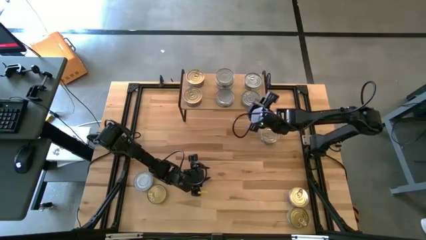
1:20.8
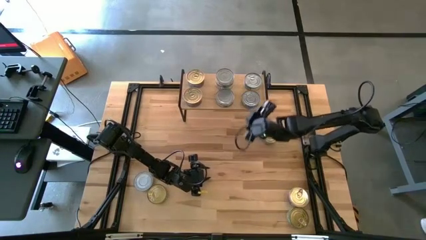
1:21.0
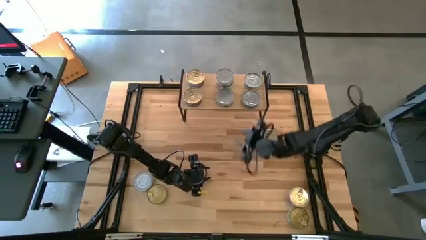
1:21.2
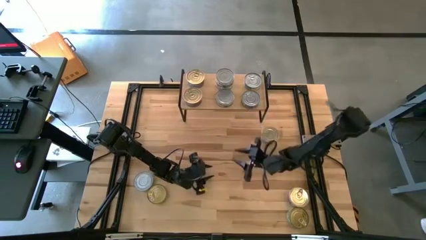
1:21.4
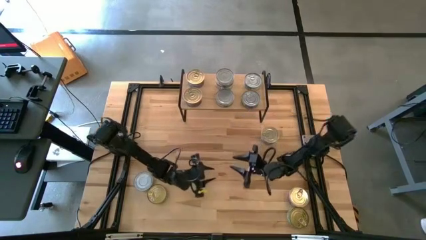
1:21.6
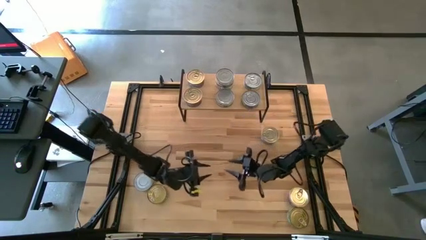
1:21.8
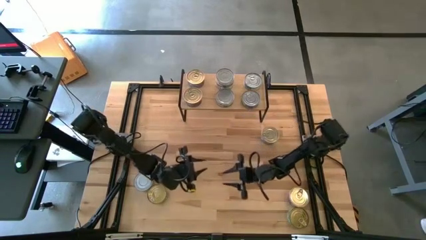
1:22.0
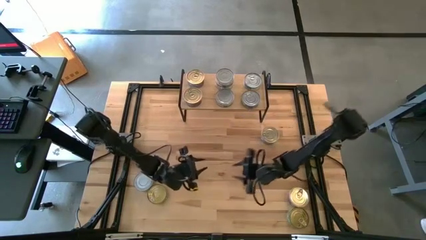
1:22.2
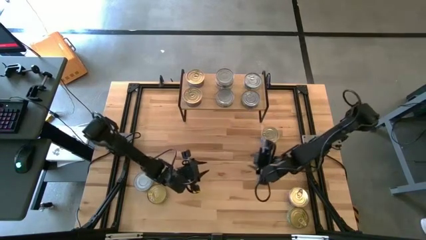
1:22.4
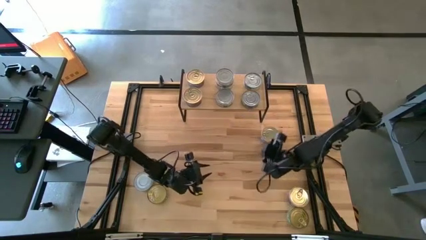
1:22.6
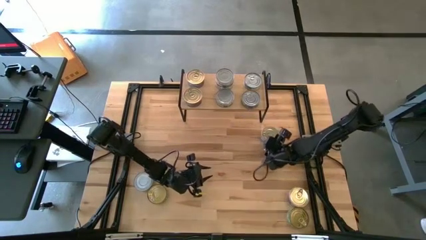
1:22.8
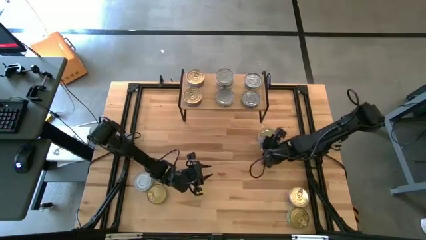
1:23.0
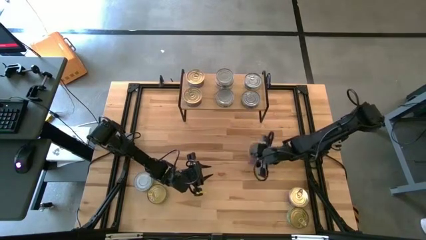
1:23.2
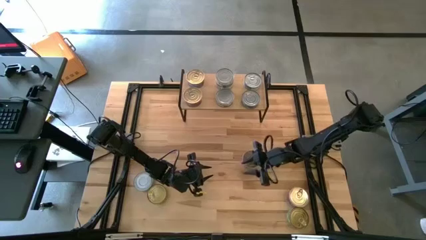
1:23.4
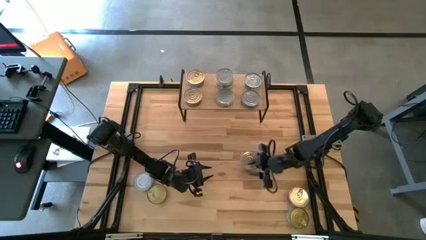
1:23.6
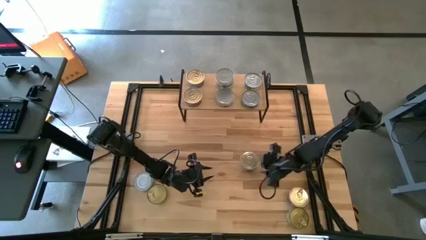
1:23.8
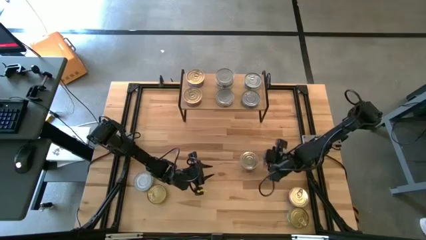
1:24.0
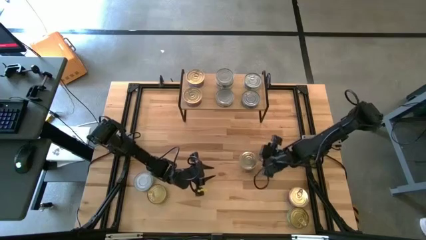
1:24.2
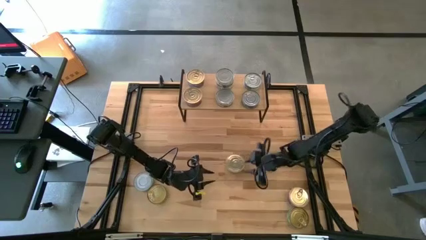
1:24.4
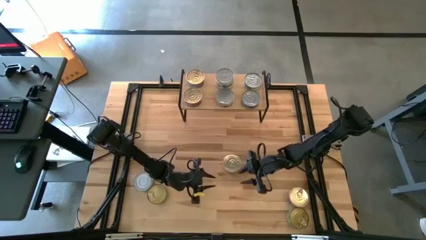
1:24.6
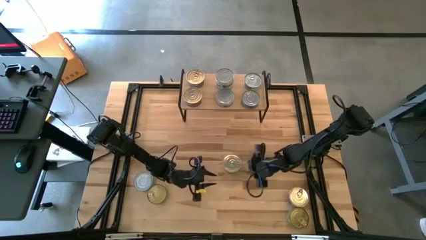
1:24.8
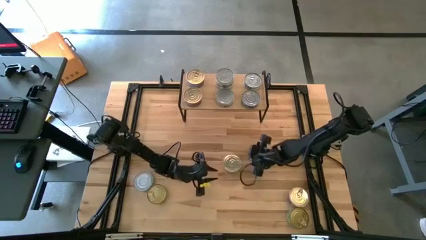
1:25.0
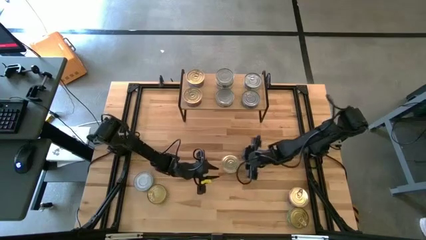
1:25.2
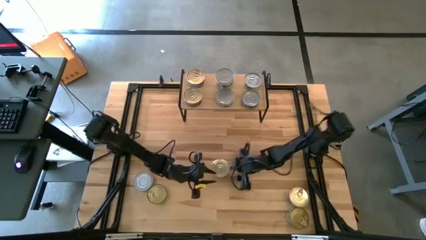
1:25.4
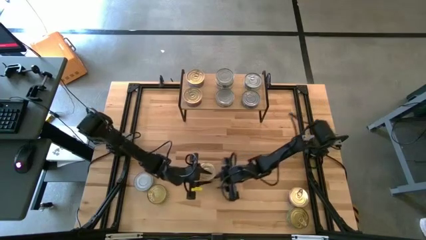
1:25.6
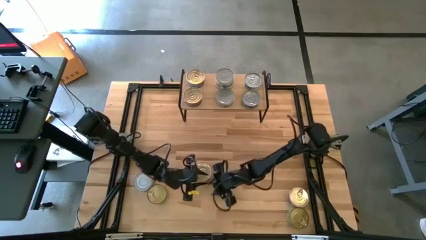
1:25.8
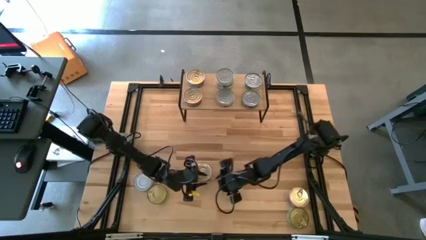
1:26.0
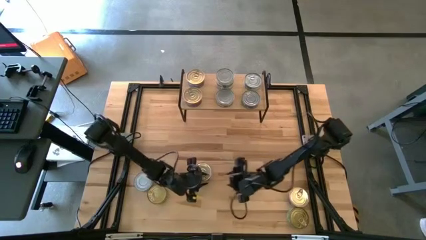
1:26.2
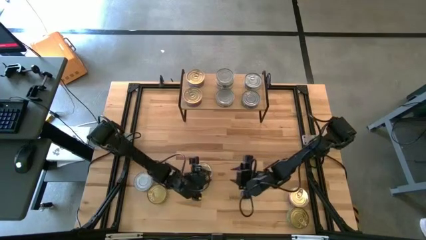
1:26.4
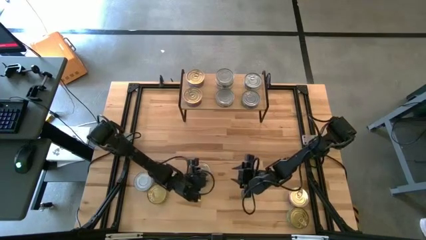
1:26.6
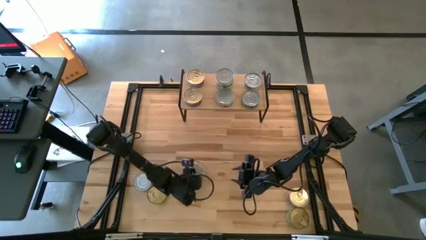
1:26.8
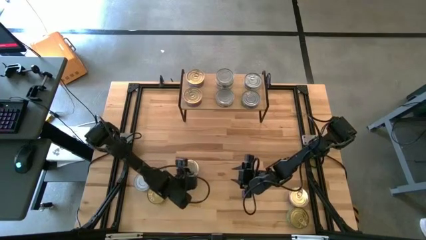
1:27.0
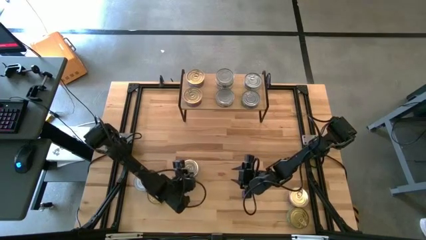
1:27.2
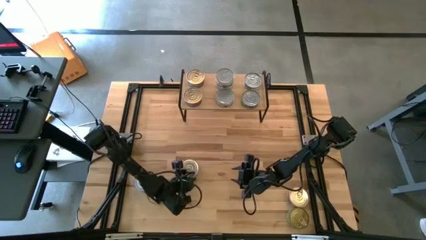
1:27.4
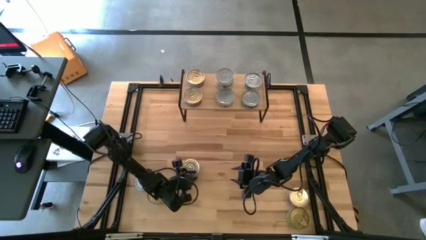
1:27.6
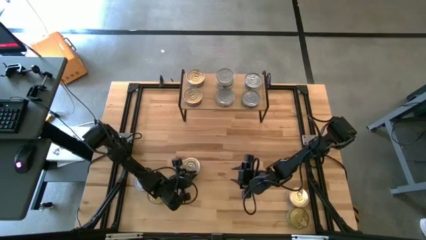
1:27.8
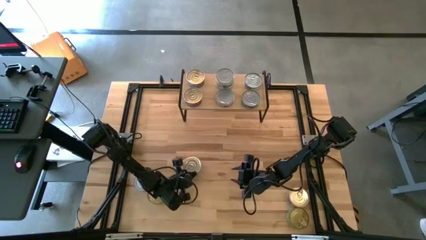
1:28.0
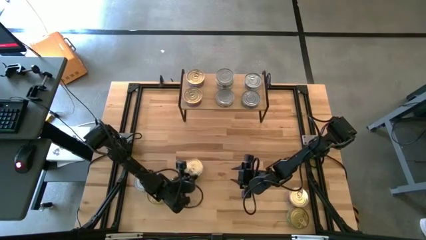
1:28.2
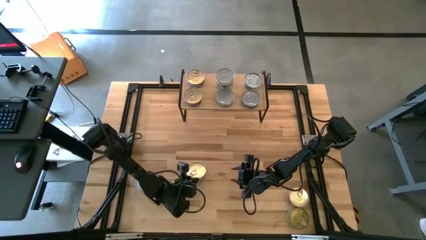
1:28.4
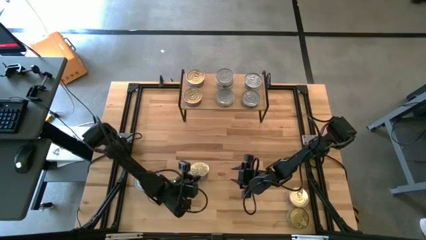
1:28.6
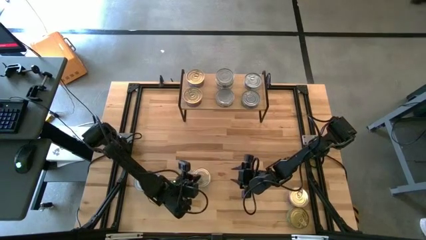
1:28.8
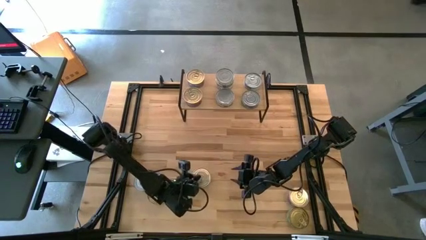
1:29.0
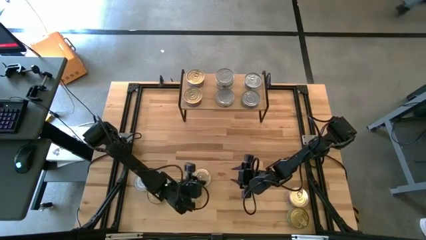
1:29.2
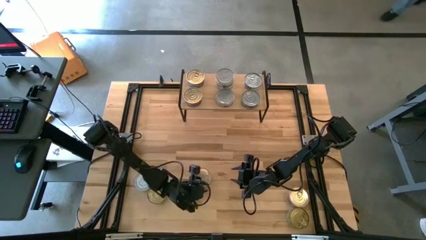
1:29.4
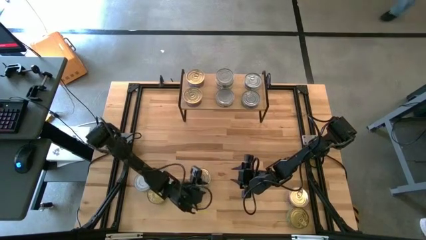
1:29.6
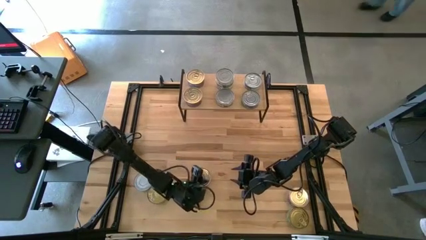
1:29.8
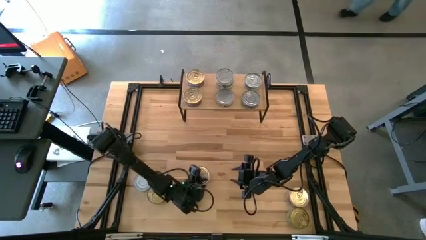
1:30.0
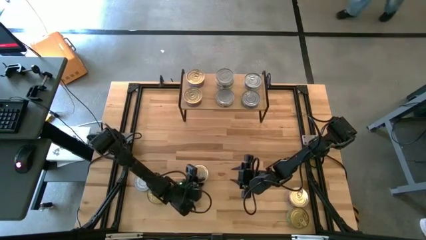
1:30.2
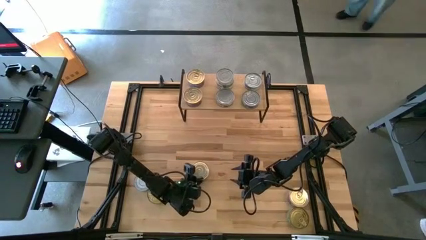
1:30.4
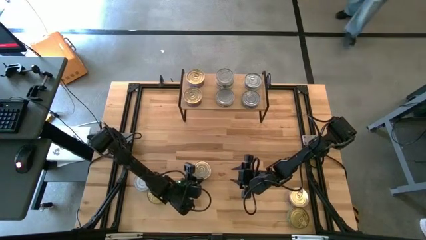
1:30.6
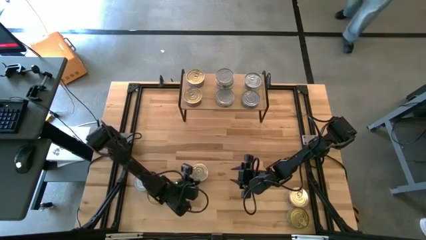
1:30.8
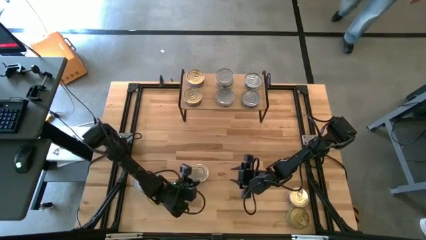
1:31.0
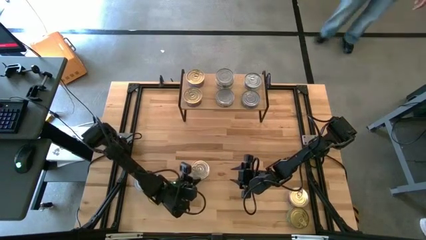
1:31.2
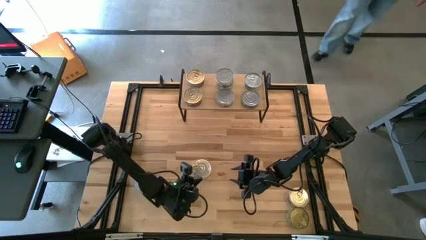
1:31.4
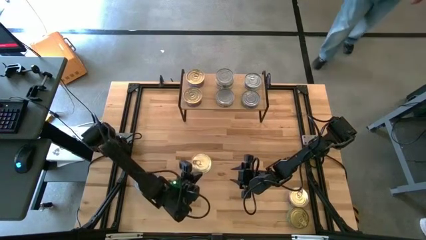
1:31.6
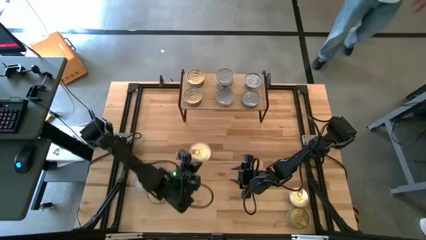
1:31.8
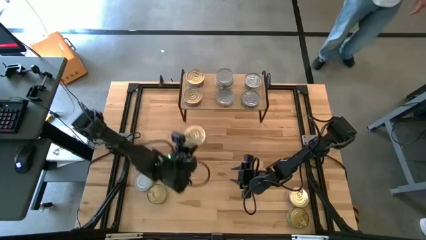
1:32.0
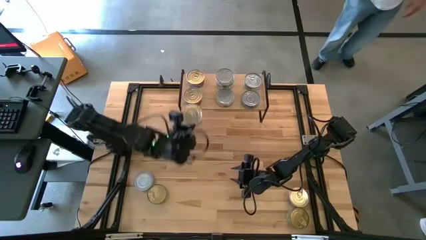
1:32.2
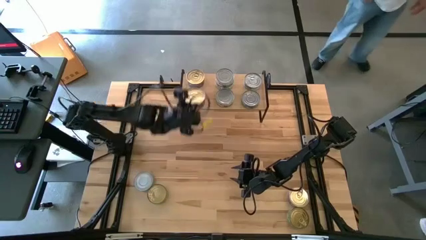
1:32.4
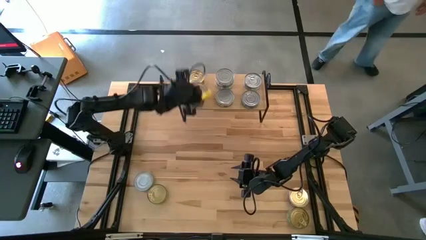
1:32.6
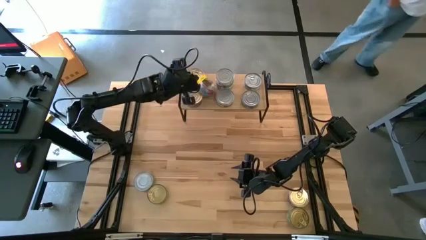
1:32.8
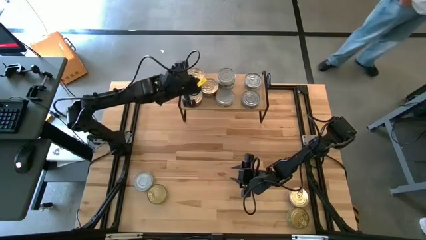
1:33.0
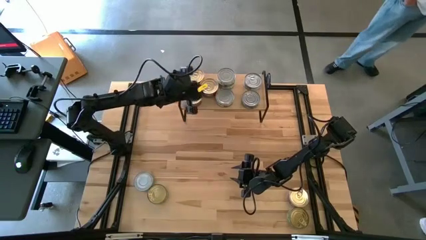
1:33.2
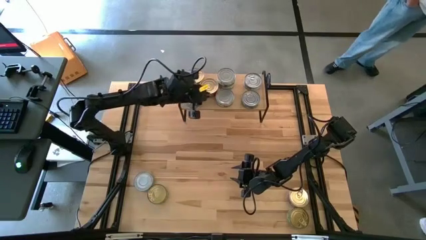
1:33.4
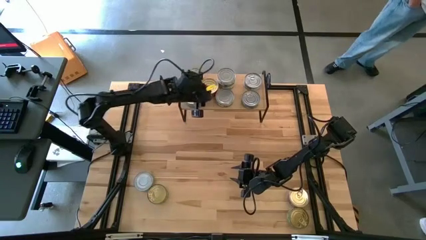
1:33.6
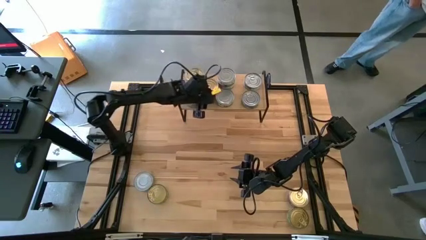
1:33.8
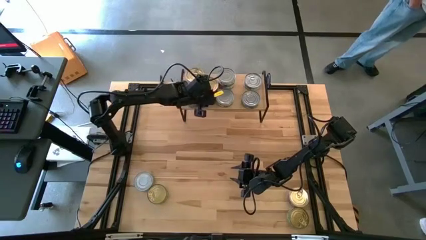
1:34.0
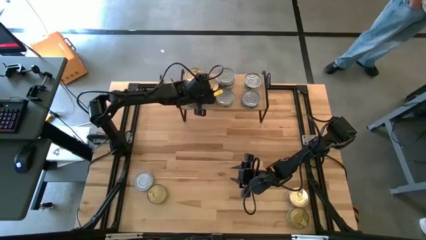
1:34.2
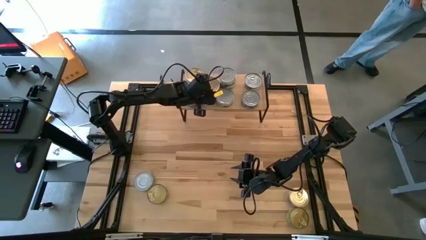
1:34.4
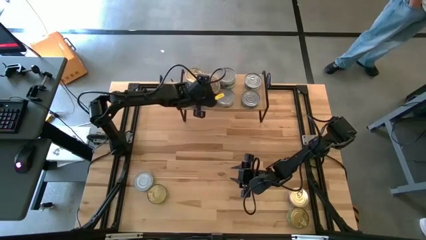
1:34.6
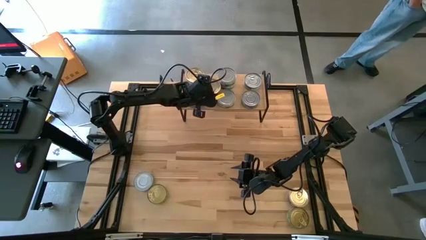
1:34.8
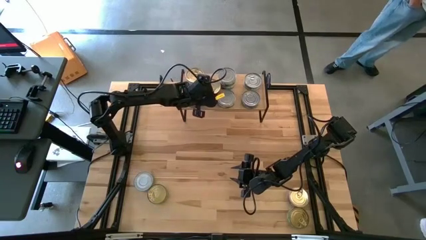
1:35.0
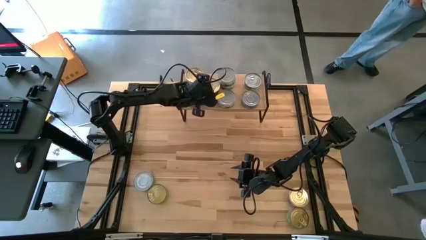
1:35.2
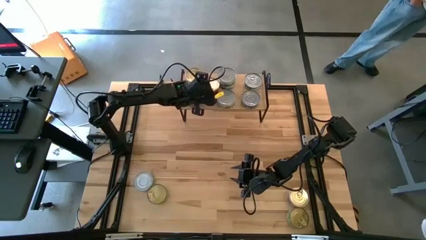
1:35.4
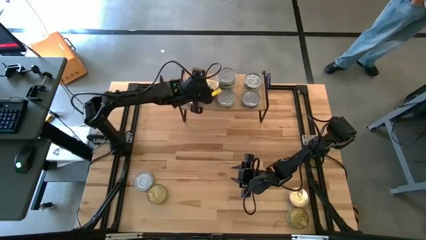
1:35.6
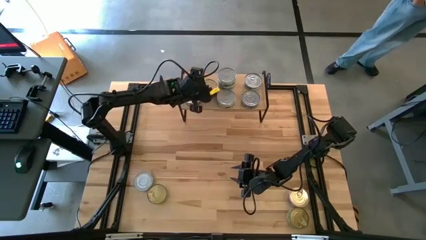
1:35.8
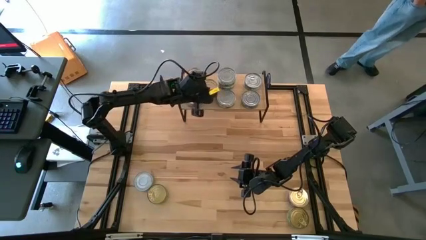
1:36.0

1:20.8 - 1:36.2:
Task: Stack canned seafood by type on shelf
Stack the blue pink tuna can on top of the other blue pink tuna can on the shelf

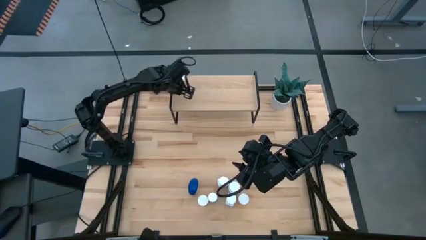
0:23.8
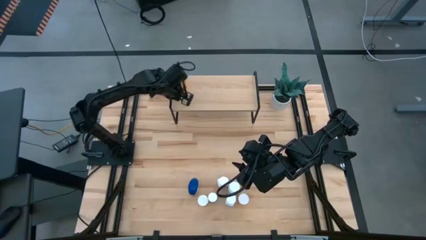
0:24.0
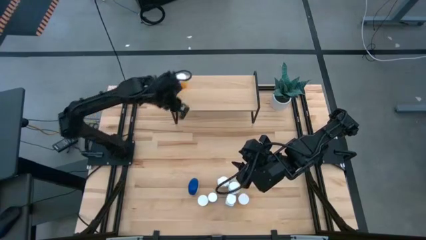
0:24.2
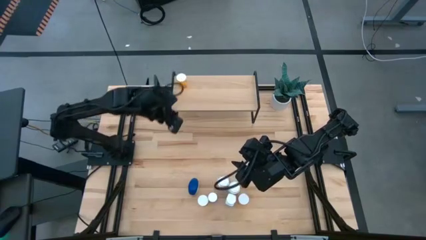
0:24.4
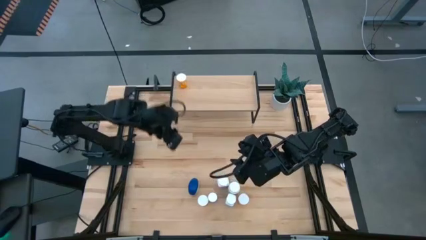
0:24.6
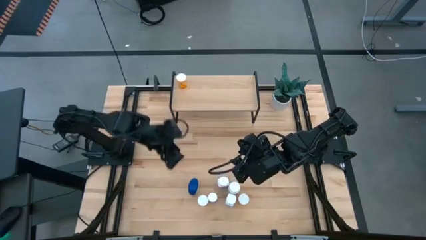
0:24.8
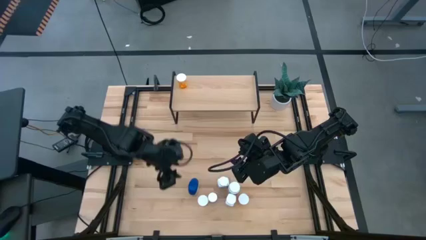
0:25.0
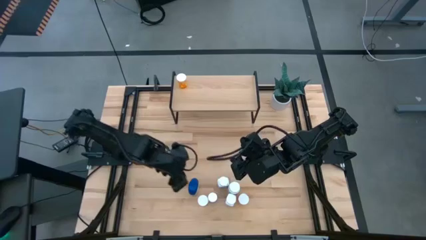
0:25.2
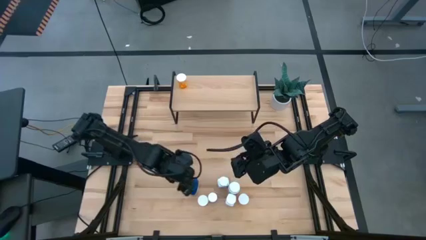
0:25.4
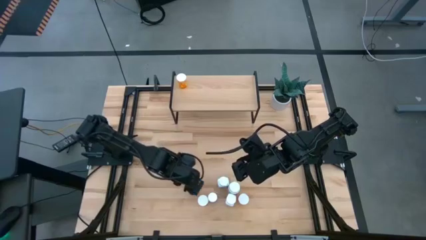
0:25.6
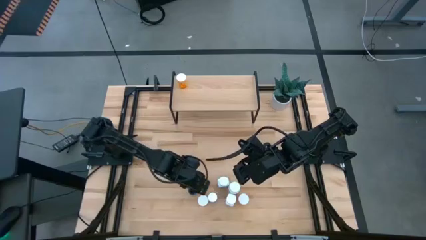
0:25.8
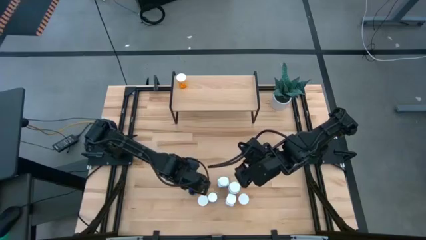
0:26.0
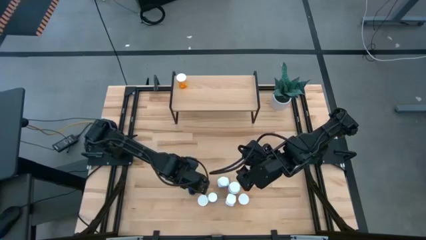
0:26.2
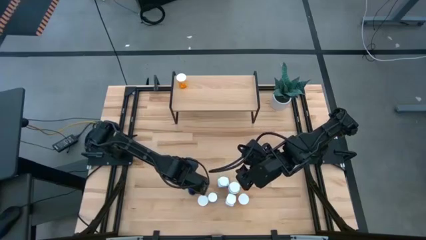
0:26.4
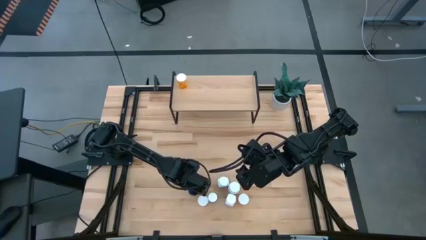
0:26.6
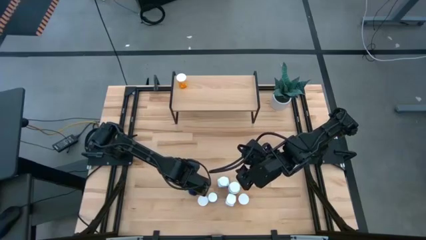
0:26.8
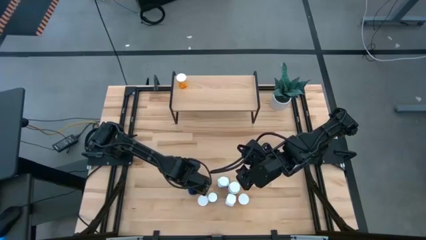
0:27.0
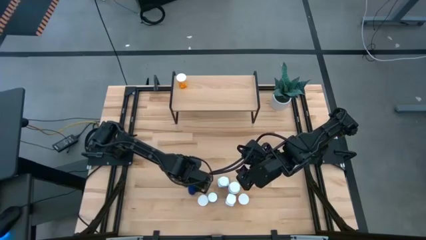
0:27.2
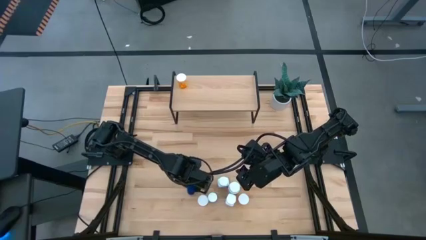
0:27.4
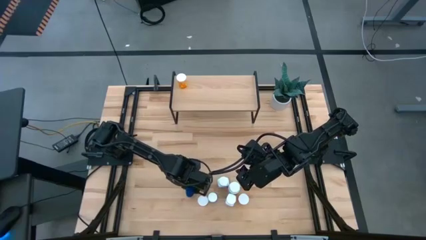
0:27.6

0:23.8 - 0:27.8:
Task: Pick and place medicine bottles onto shelf by color
Put the blue bottle on the shelf
